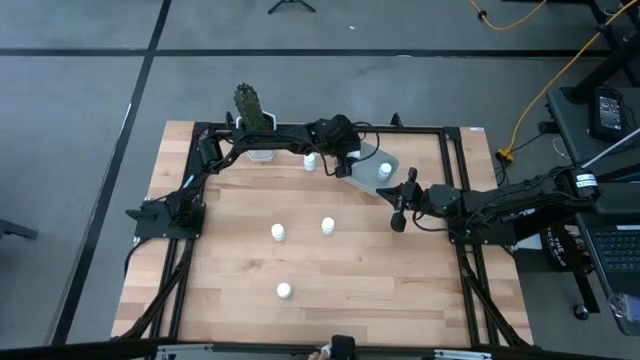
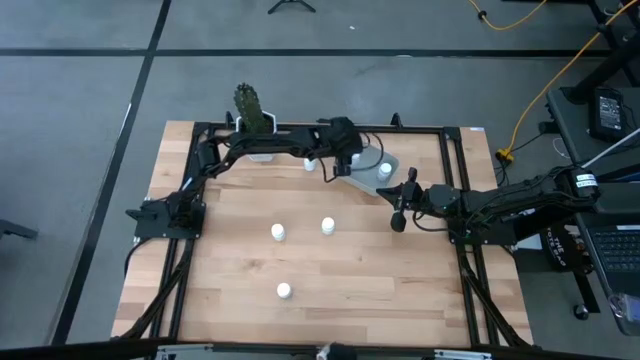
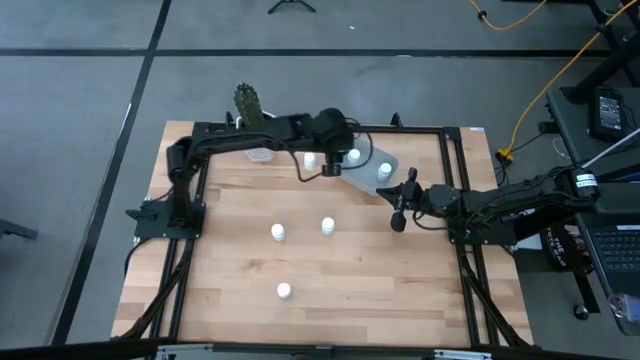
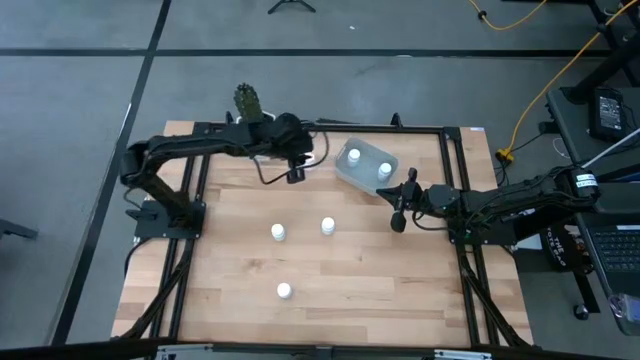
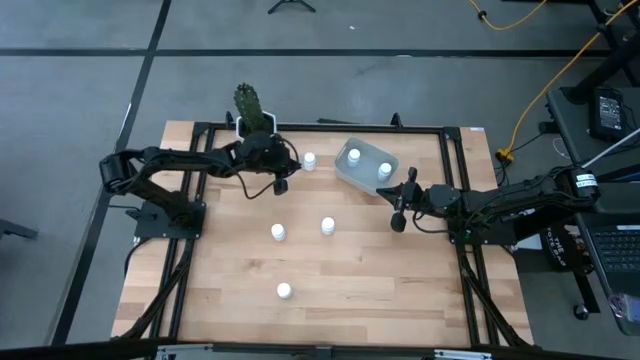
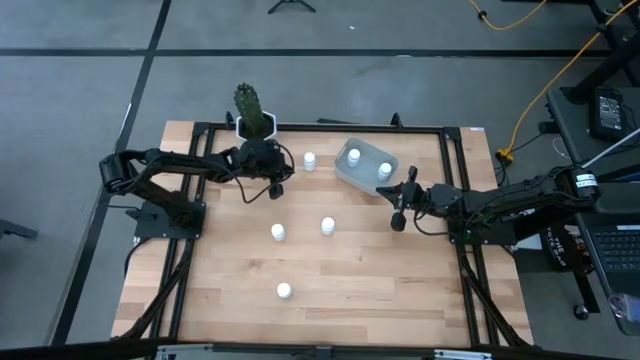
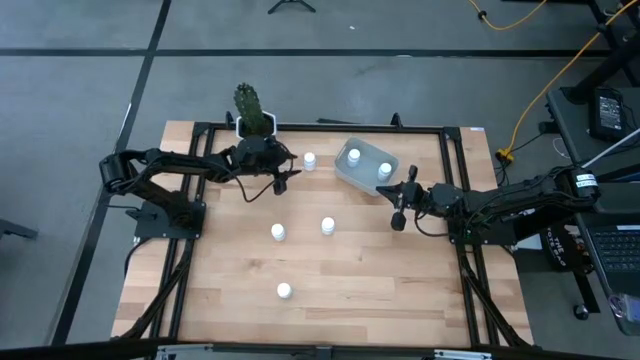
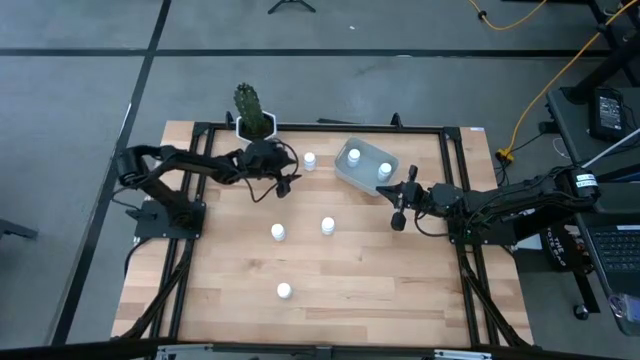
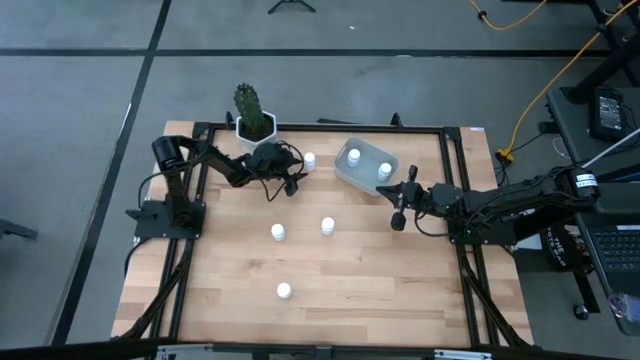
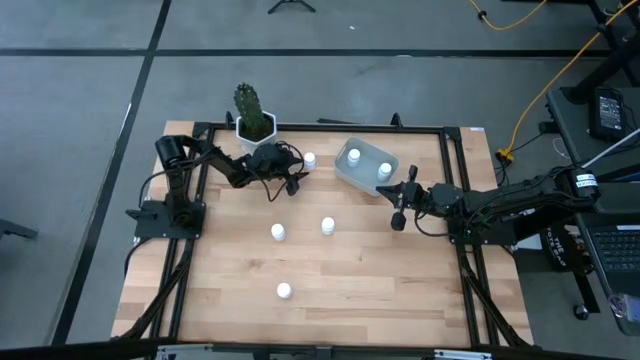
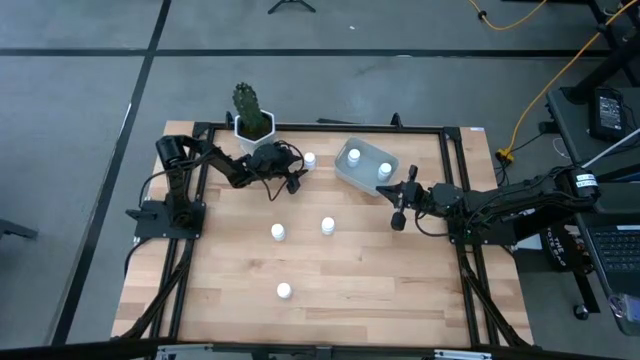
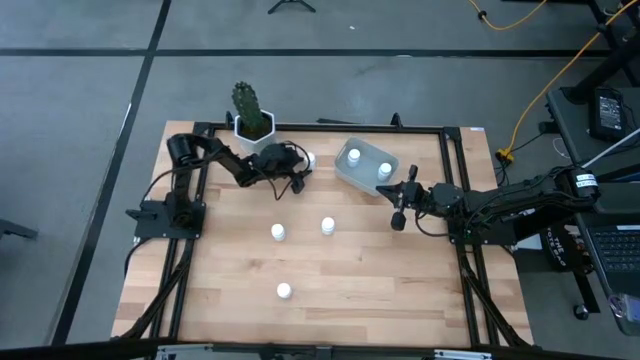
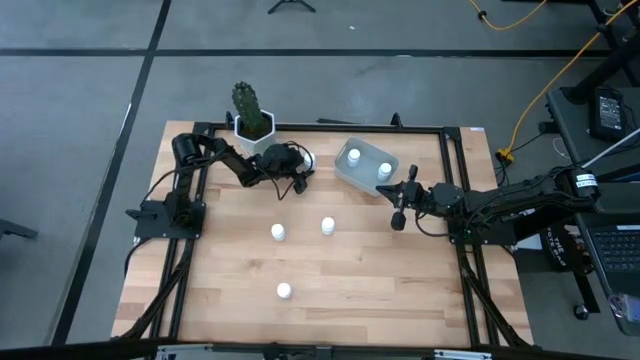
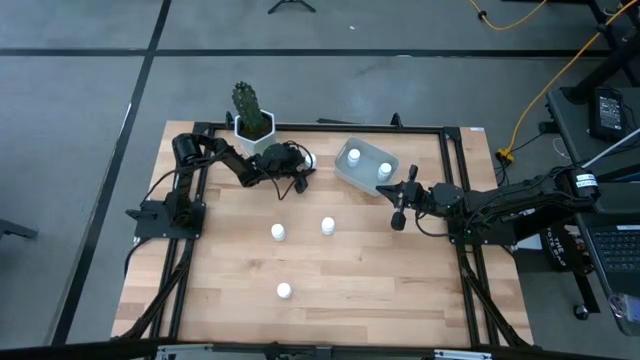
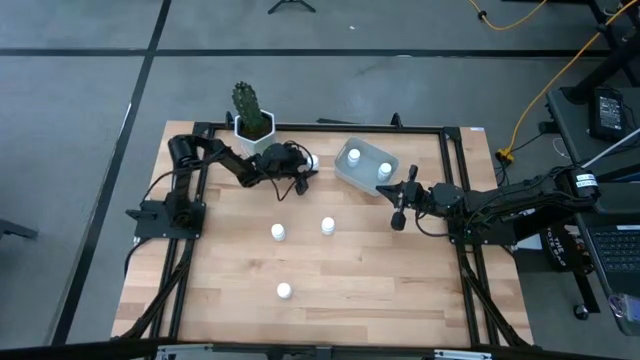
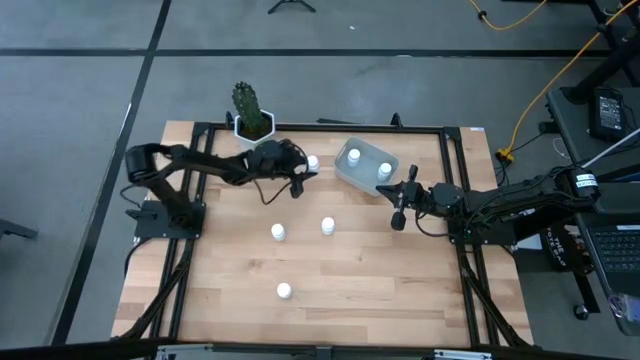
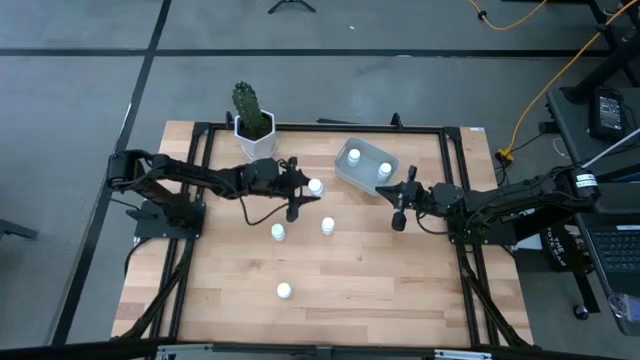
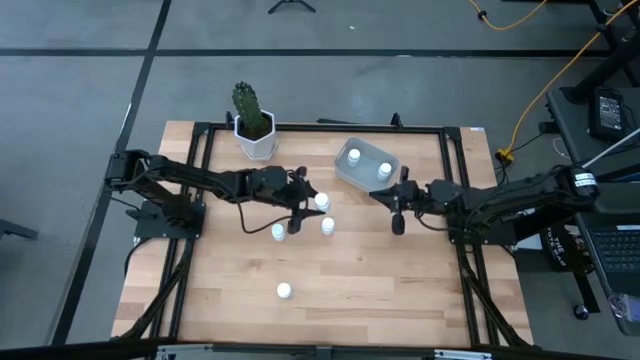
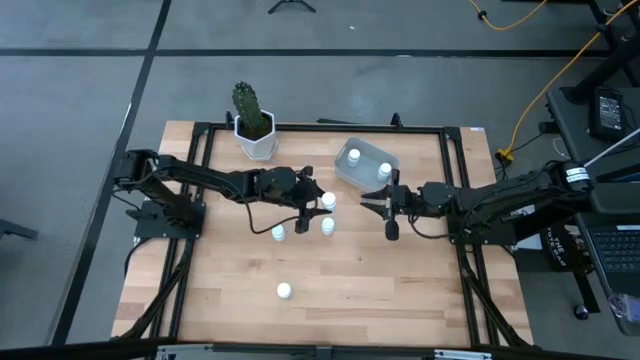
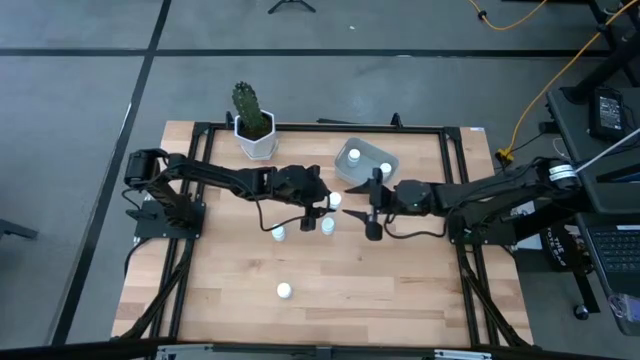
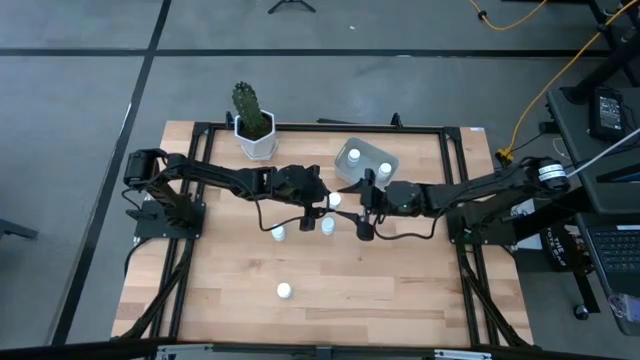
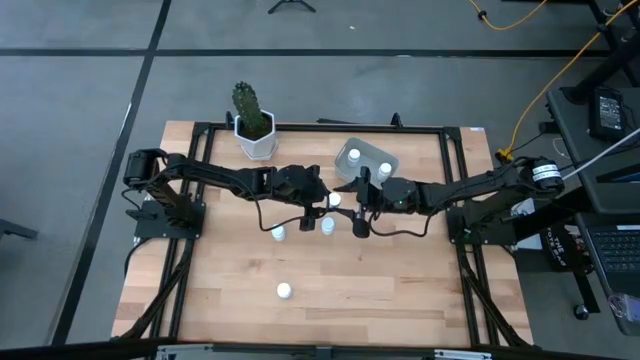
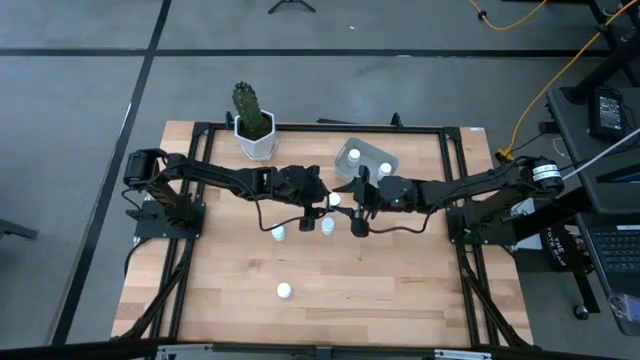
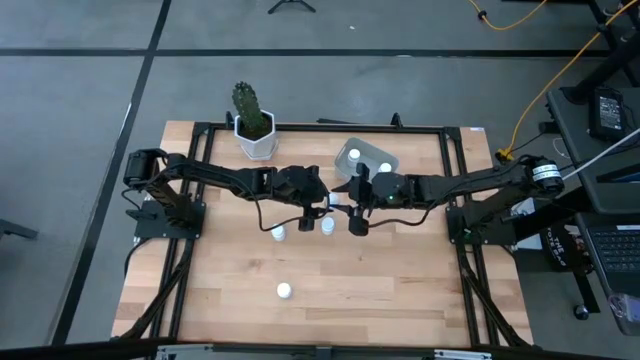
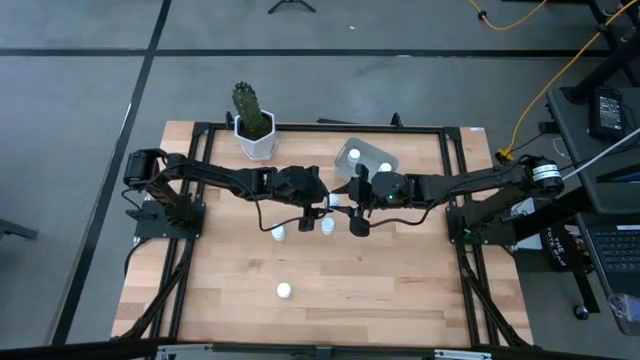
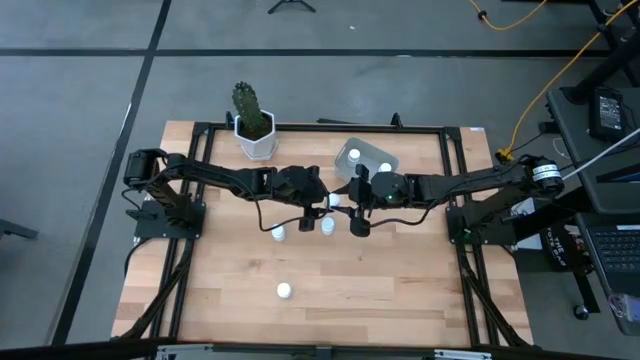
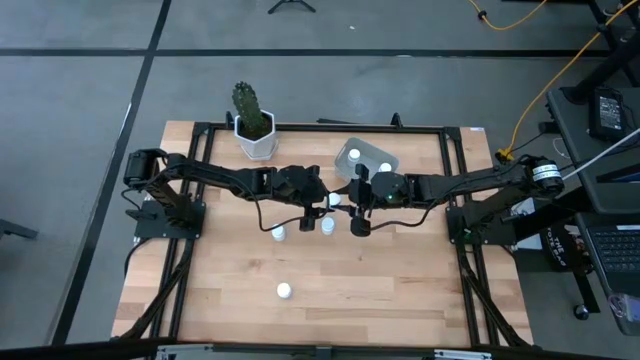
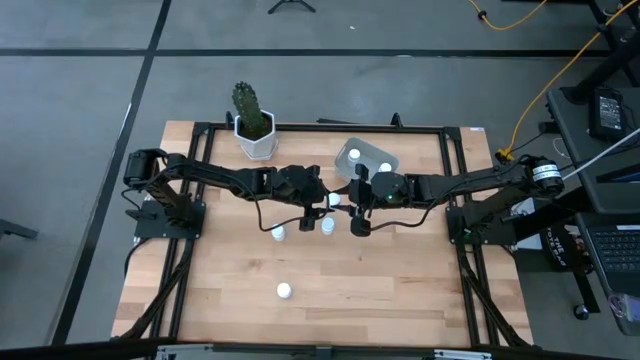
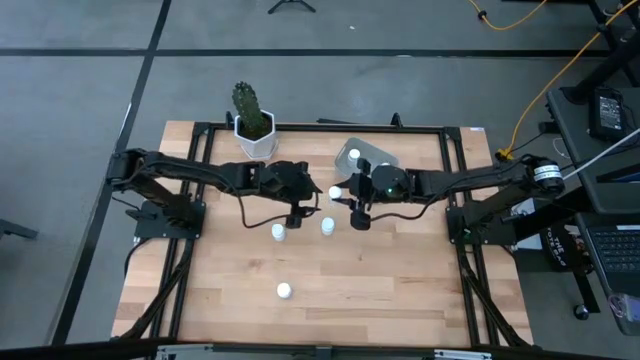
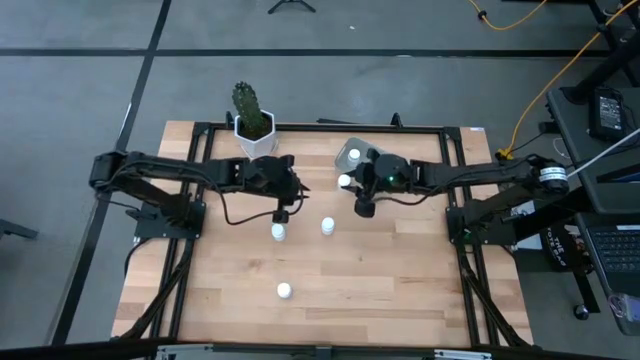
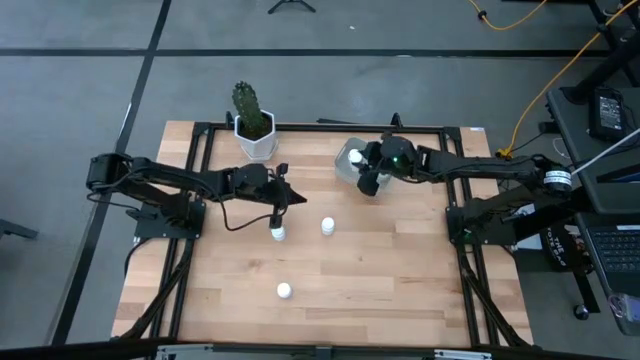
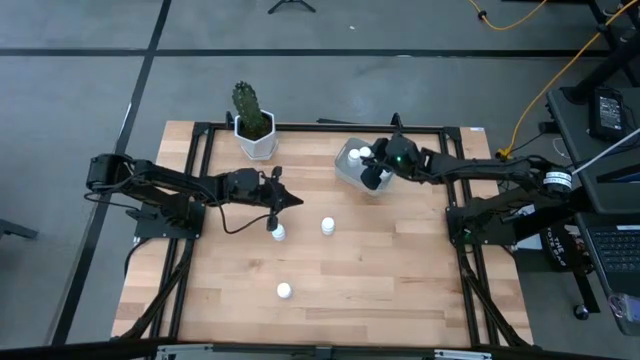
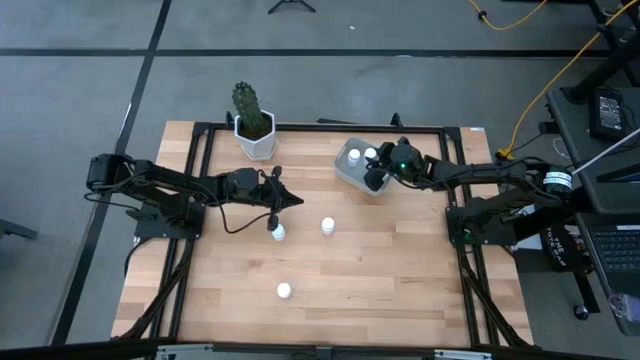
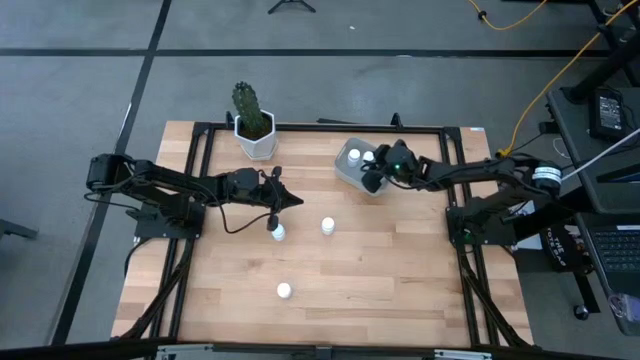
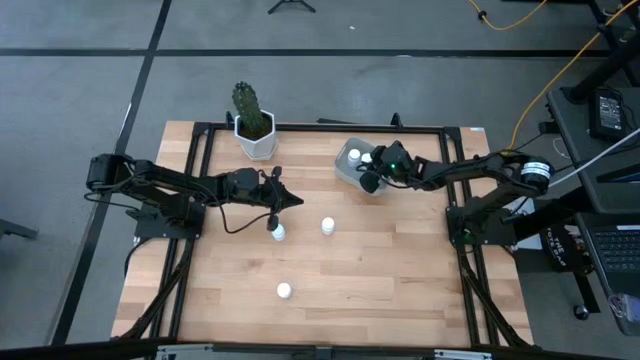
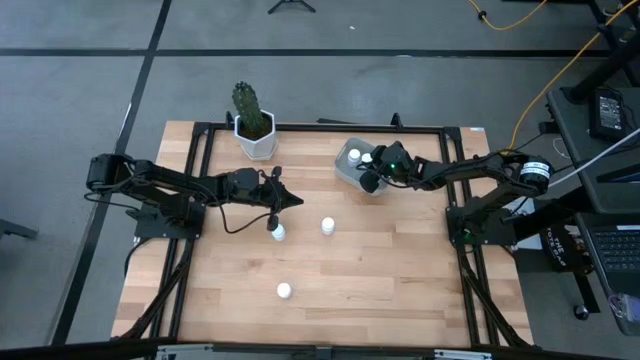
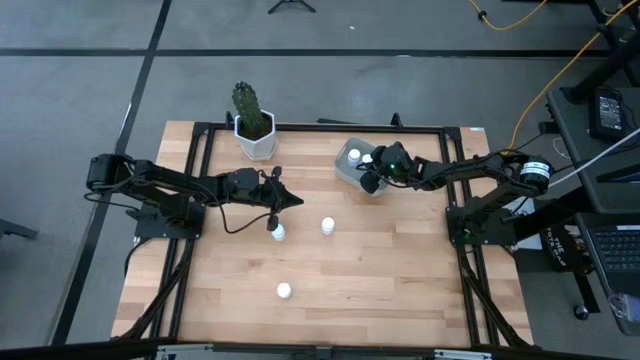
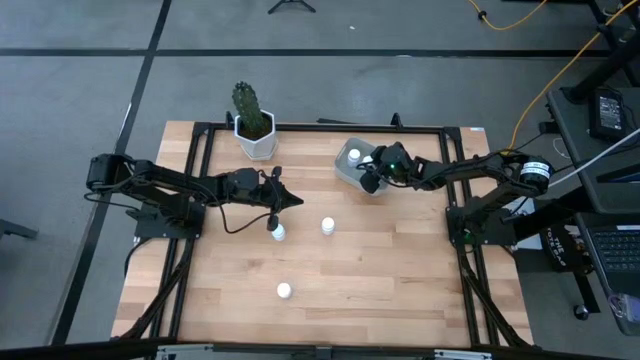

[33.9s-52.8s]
Task: Pick and place pill bottles into a basket
Put the white pill bottle into the gray bin

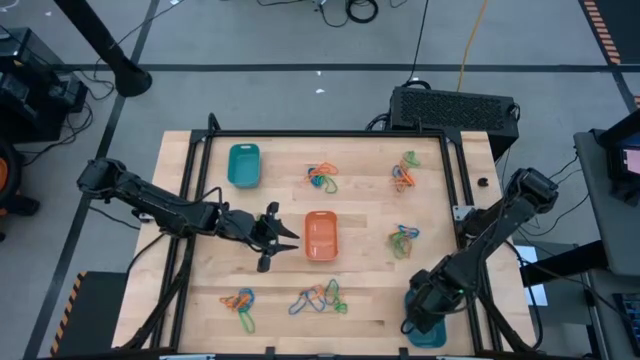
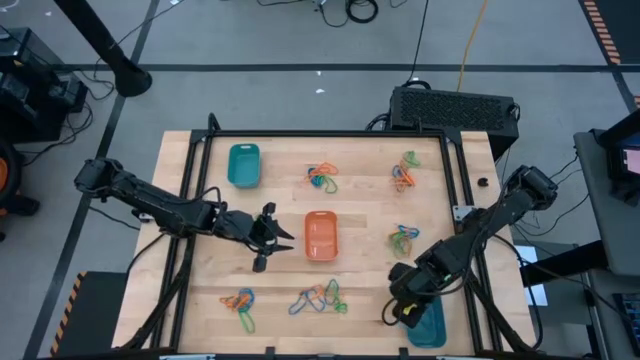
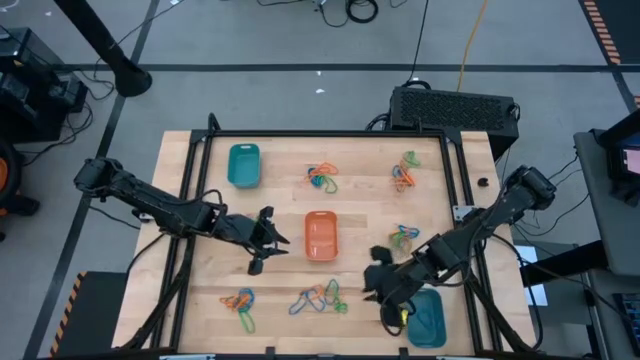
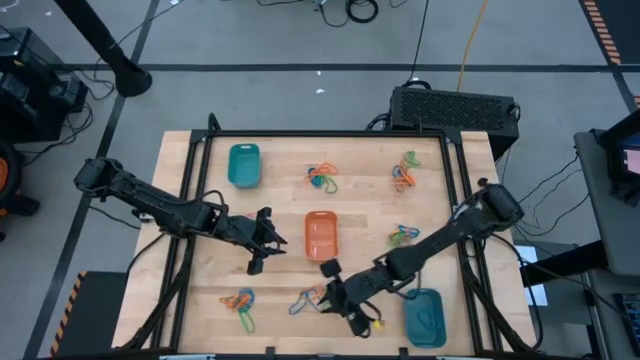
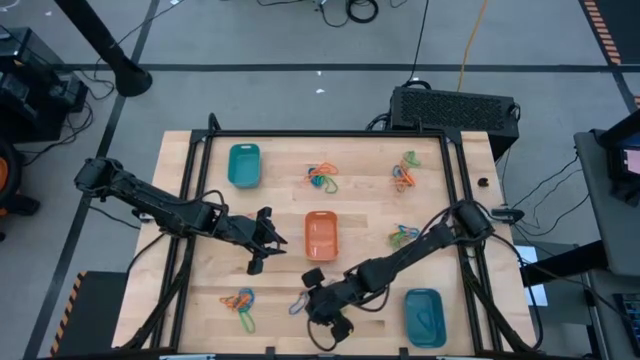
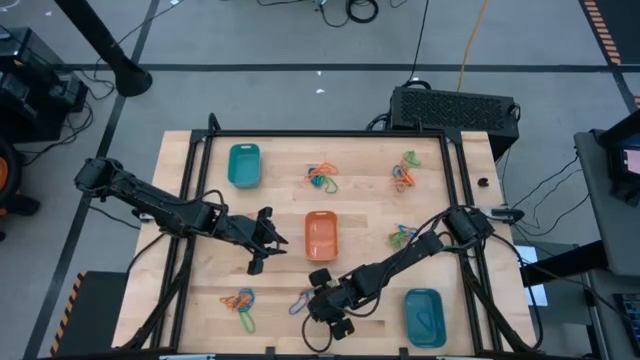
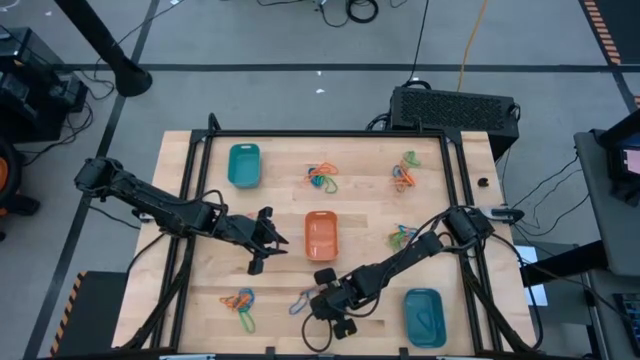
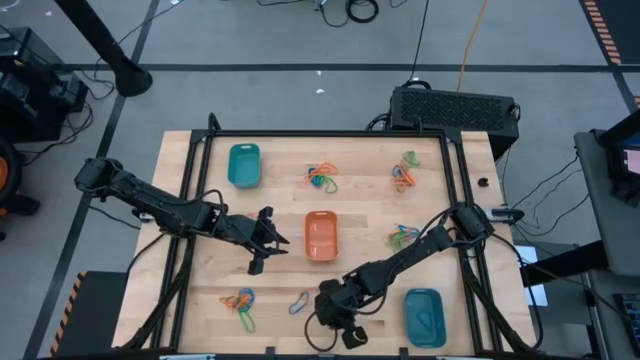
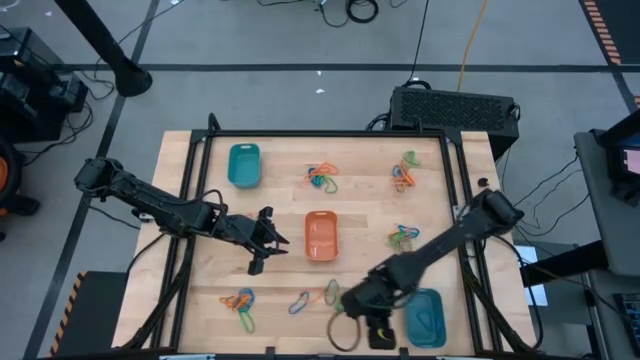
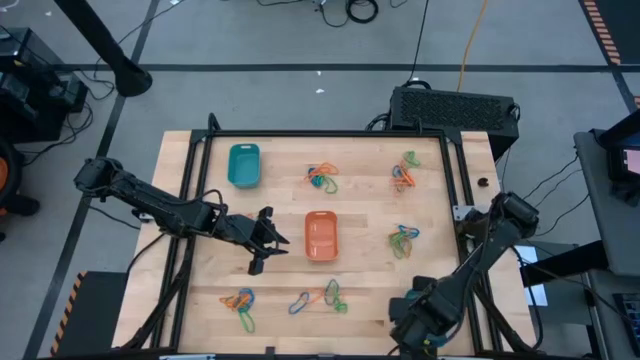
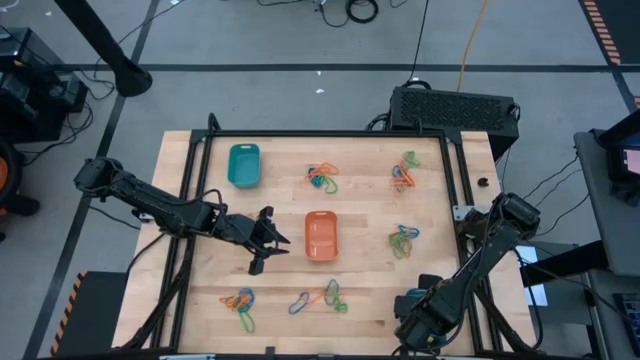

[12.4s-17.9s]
Task: Sort rubber bands into baskets
Put the blue rubber band into the blue bin
